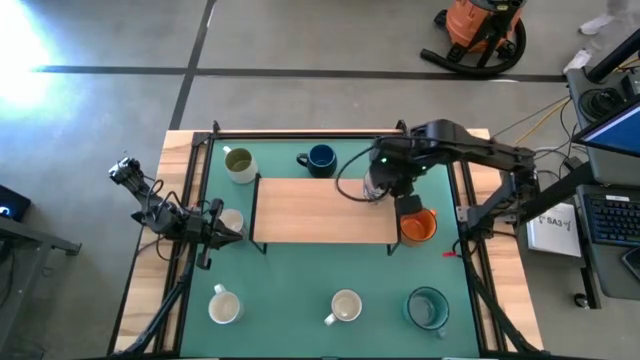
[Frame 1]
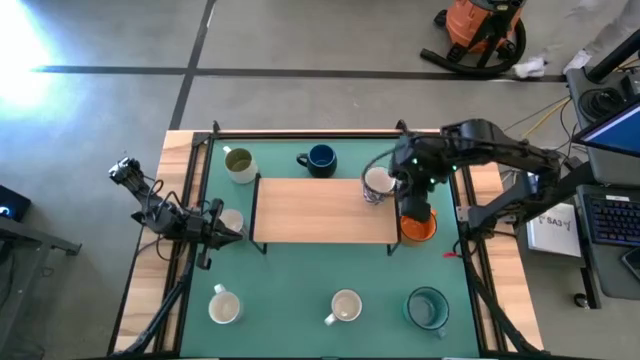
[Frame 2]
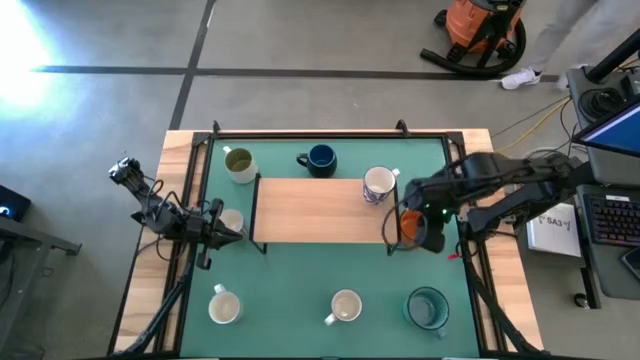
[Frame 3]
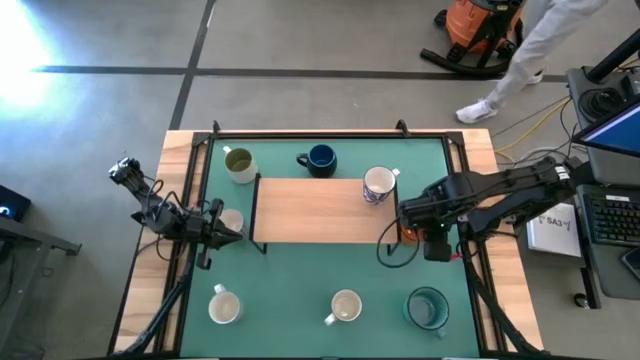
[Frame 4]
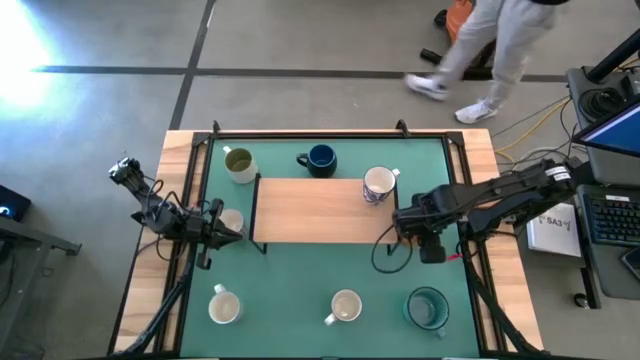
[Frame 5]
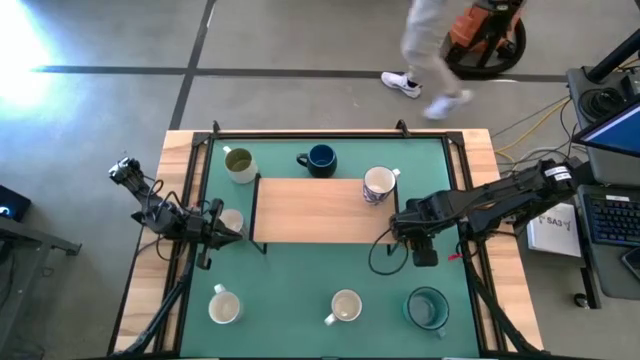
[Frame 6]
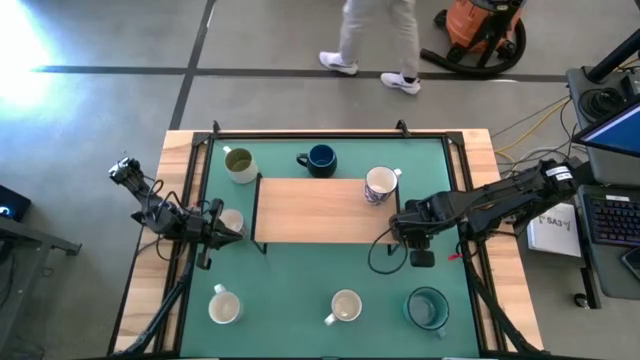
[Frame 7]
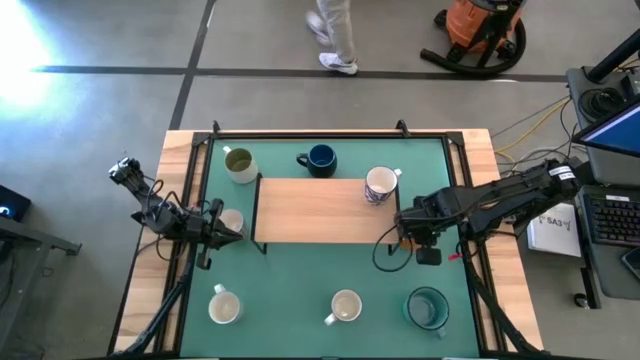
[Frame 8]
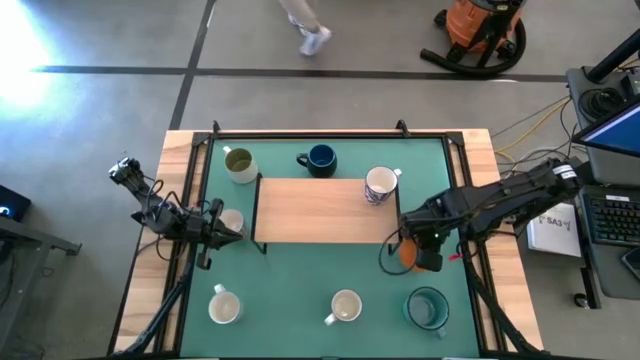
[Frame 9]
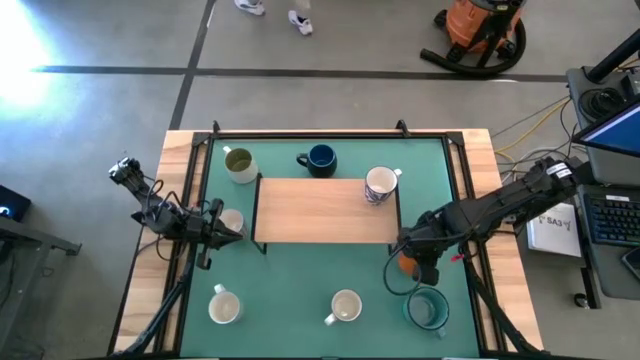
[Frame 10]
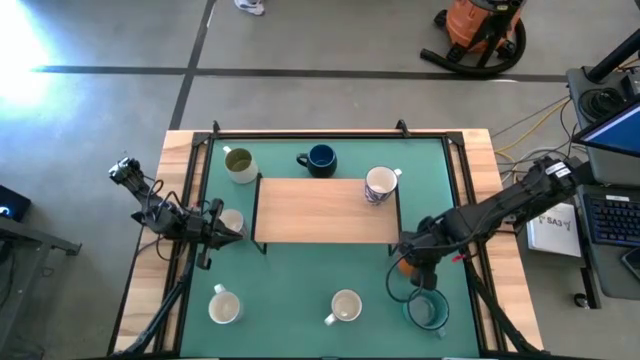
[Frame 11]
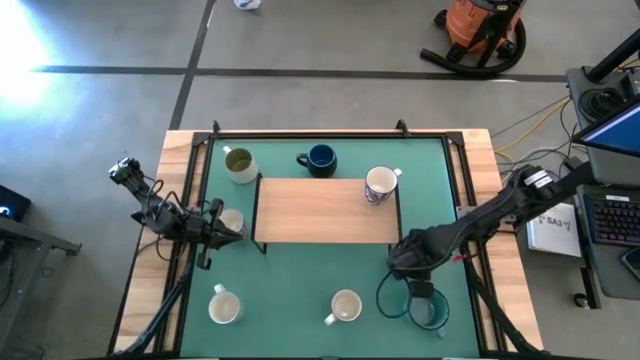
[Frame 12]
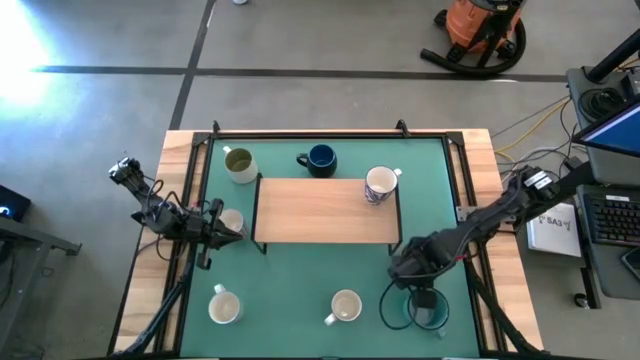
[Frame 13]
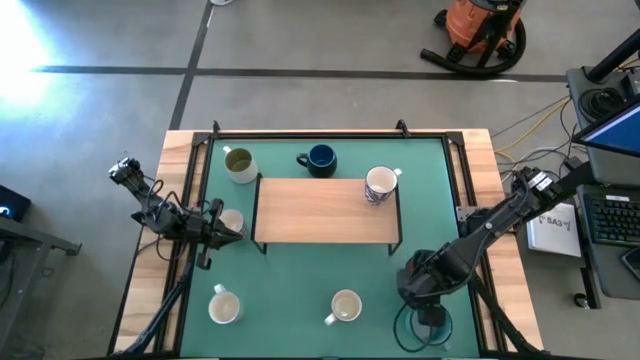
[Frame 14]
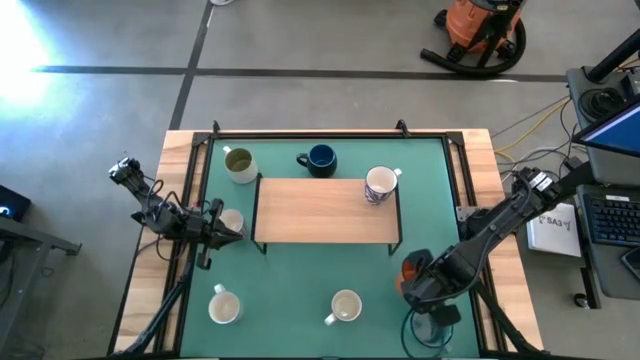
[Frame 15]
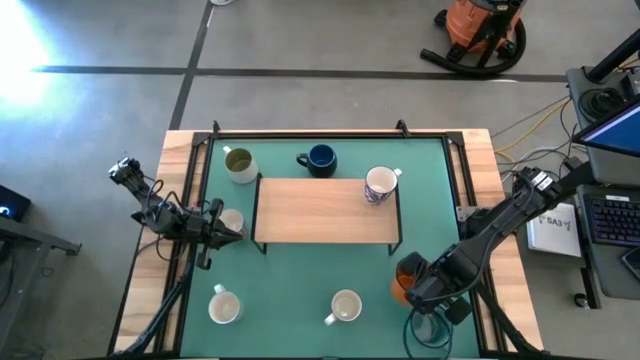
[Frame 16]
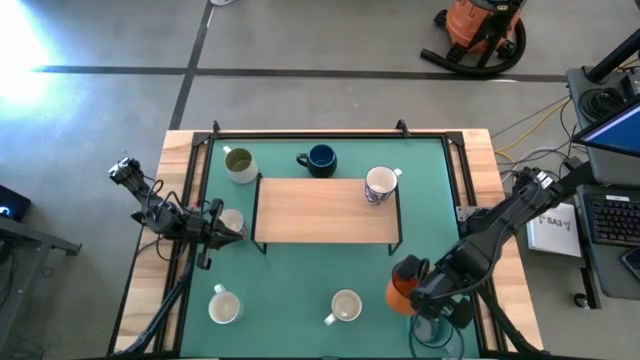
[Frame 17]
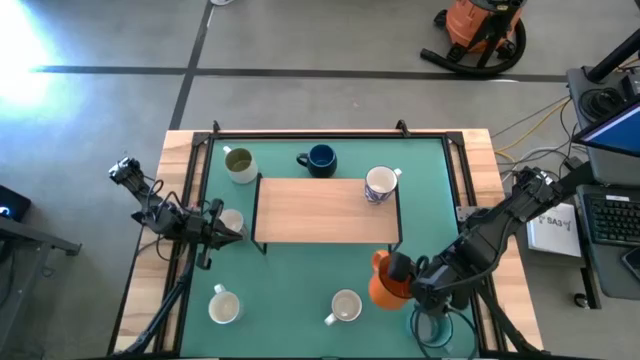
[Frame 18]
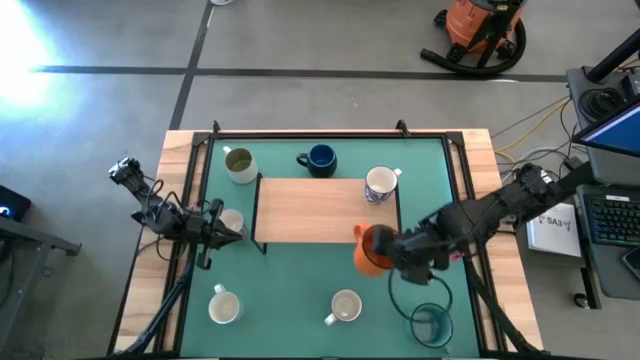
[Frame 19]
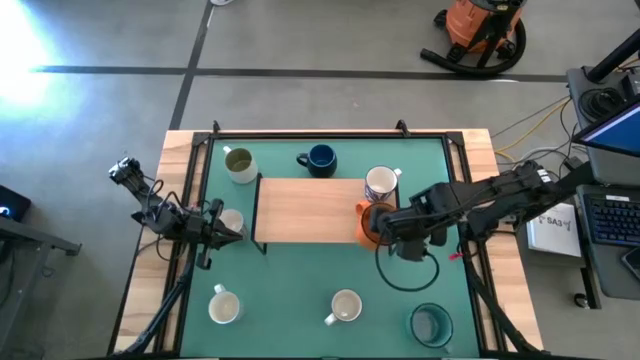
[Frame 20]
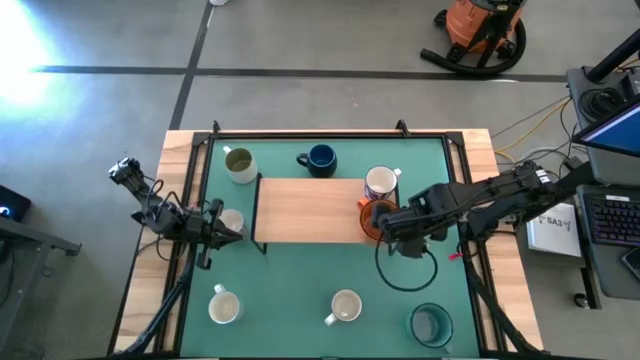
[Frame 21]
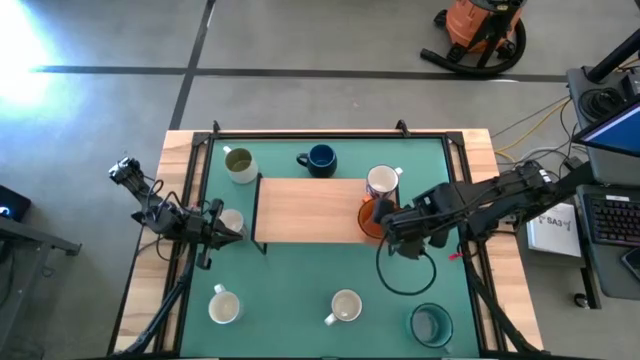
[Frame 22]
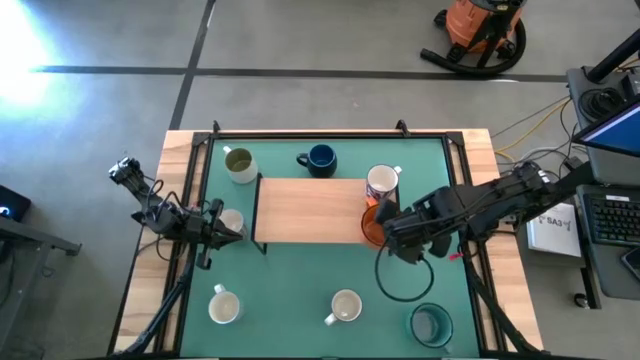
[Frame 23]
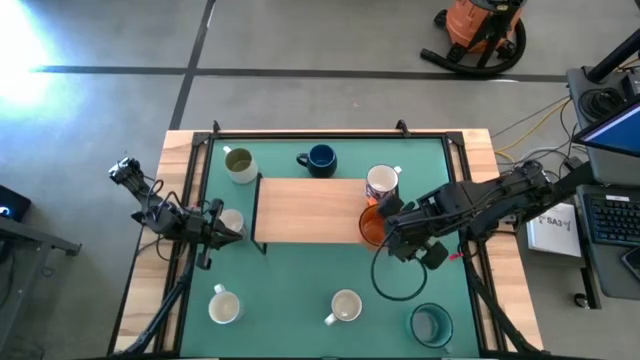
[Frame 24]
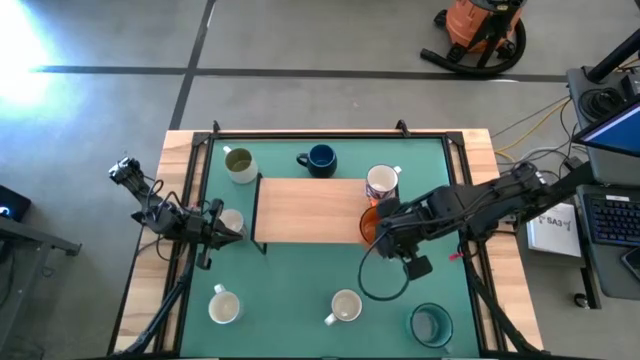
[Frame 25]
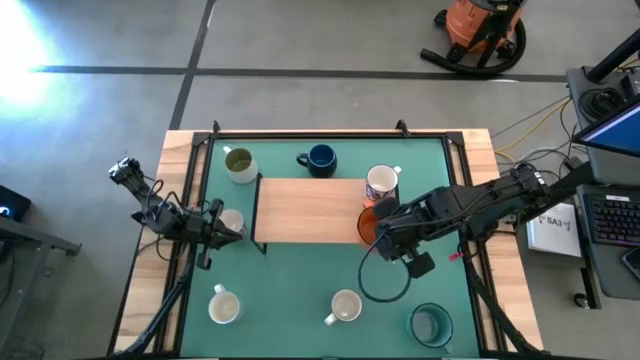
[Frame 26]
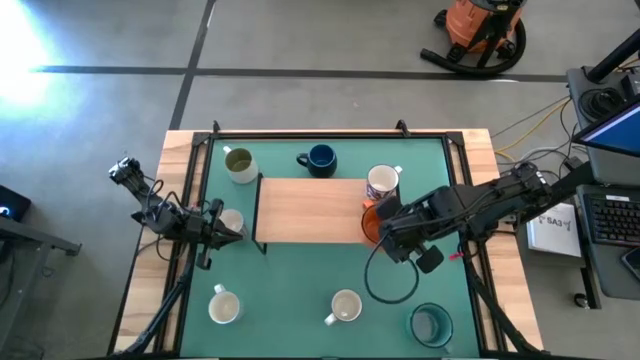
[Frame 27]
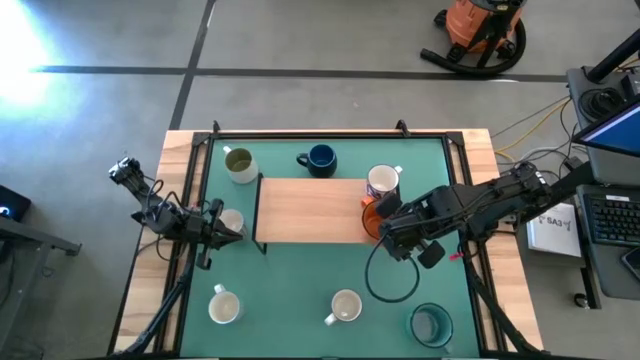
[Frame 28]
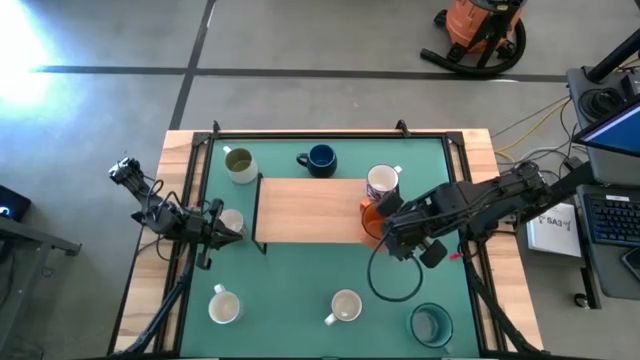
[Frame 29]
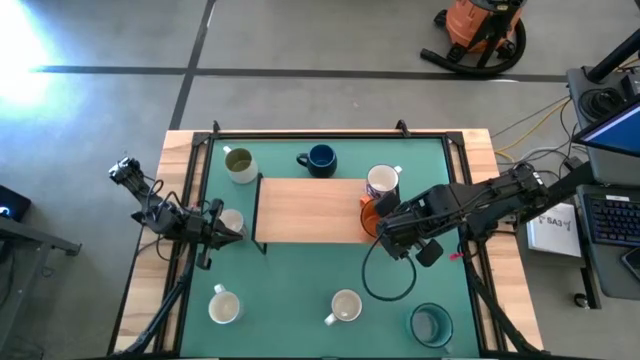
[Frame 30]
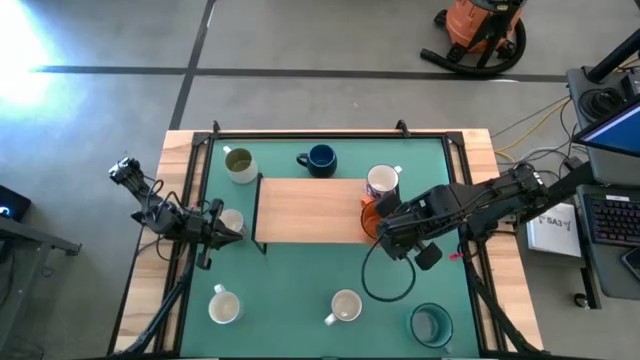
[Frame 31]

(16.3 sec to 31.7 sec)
Task: Place coffee mugs
Put the orange mug on the shelf

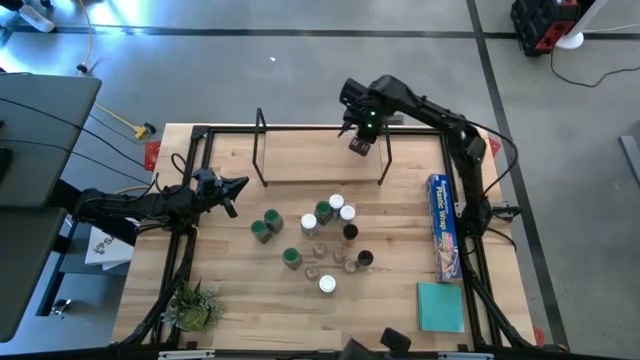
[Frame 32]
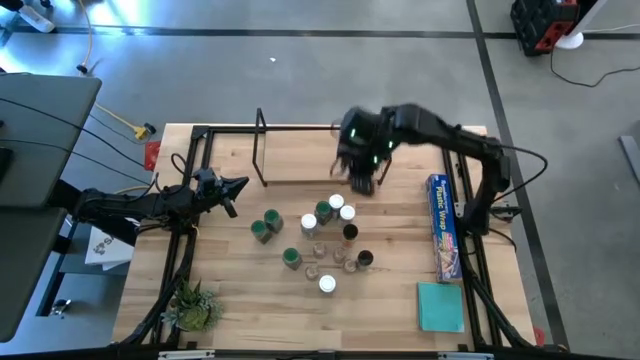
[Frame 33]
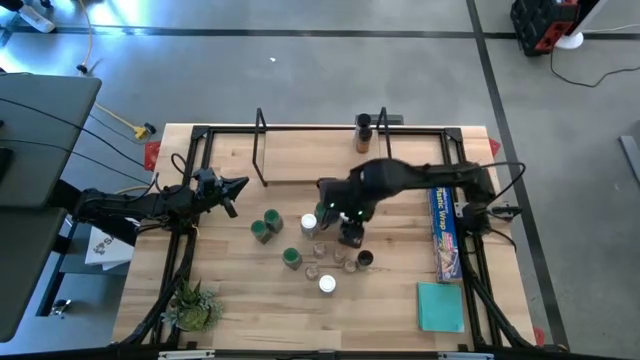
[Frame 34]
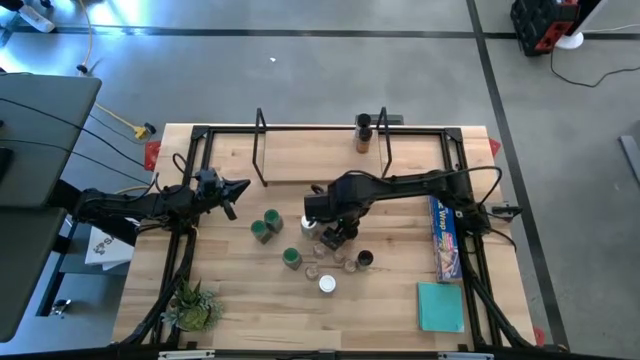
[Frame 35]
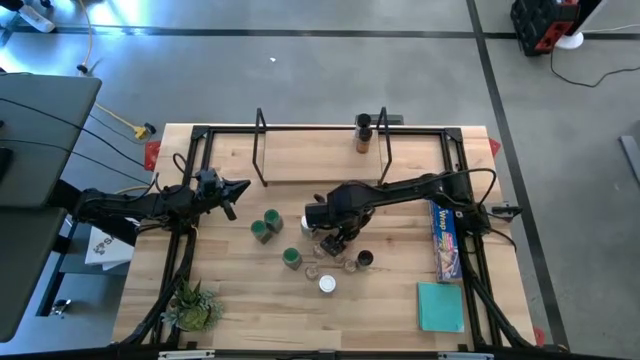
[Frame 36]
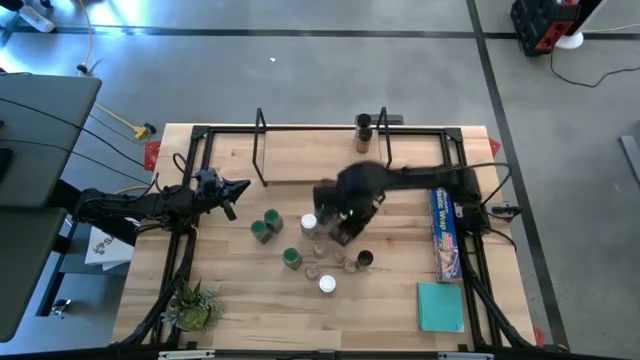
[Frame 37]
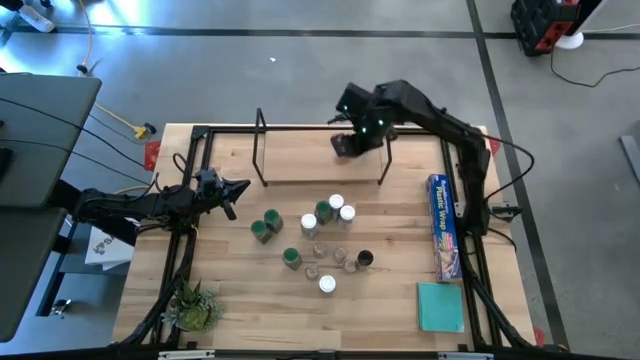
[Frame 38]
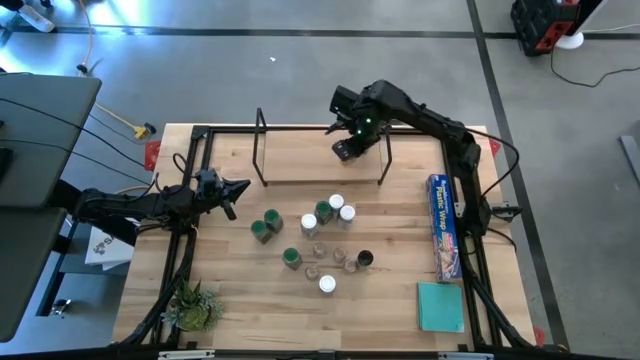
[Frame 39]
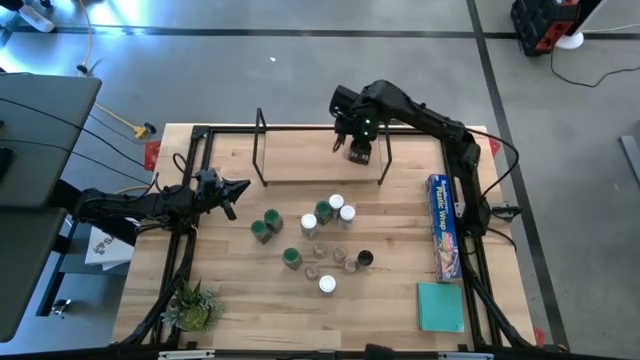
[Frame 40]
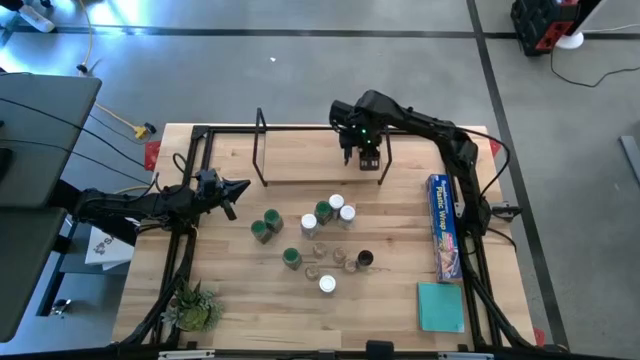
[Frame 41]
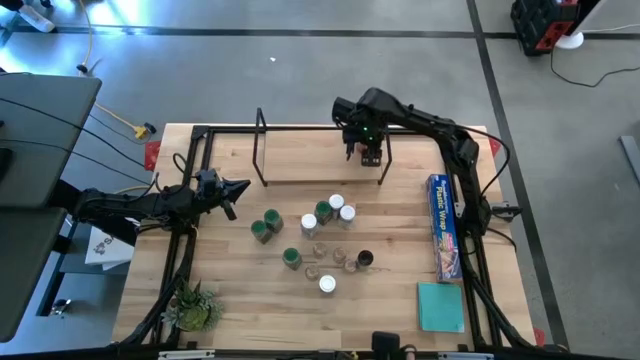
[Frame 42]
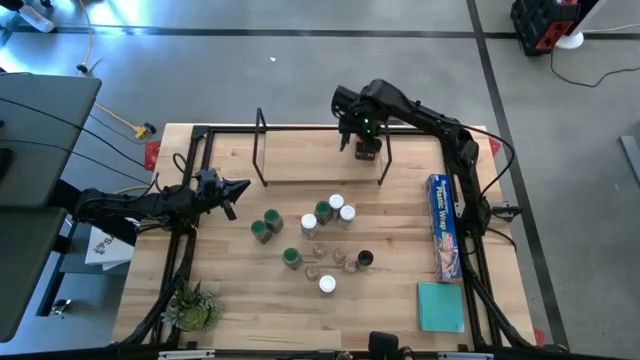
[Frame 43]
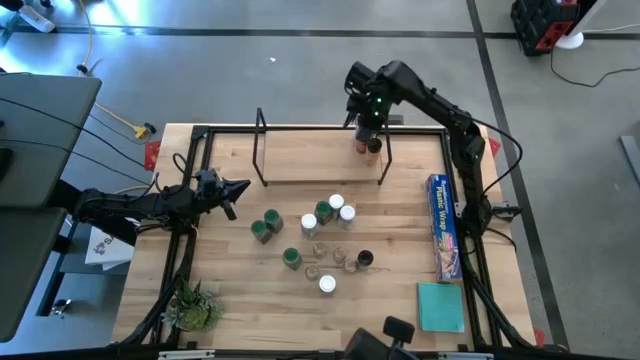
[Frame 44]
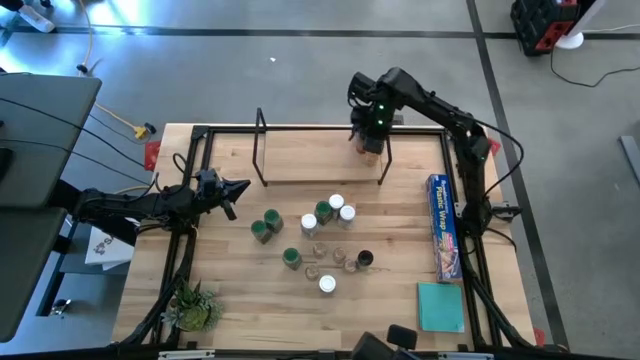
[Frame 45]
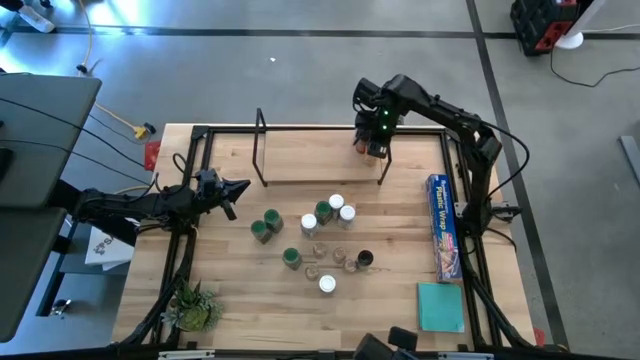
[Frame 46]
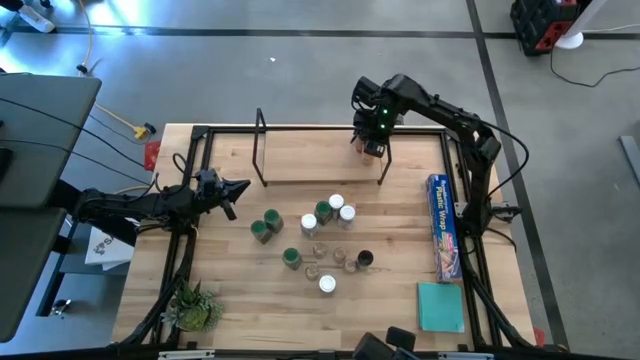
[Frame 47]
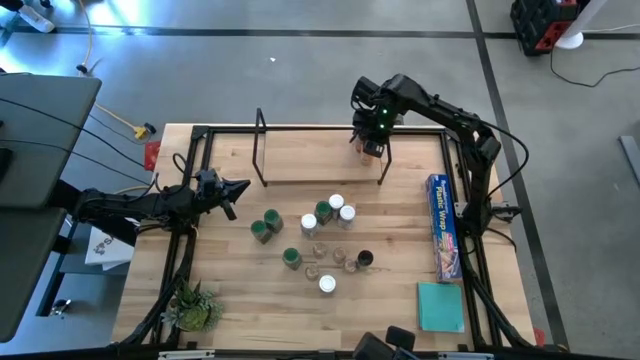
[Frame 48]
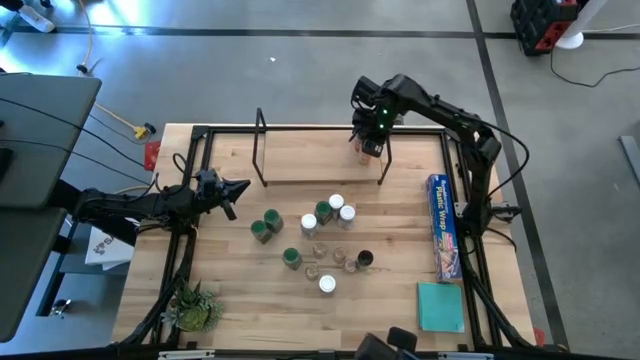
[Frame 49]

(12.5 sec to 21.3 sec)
Task: Shelf spices
Put the orange seasoning bottle on the shelf
